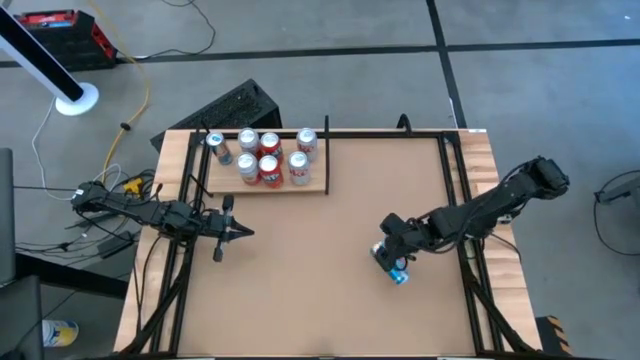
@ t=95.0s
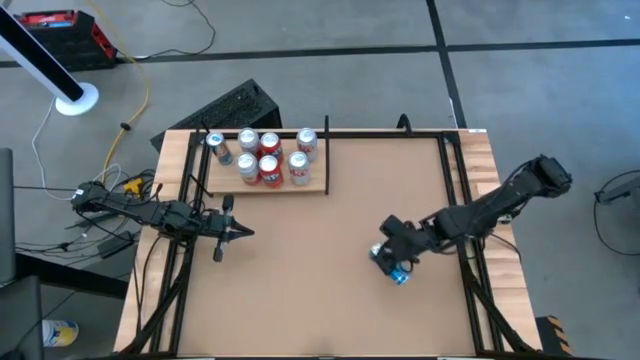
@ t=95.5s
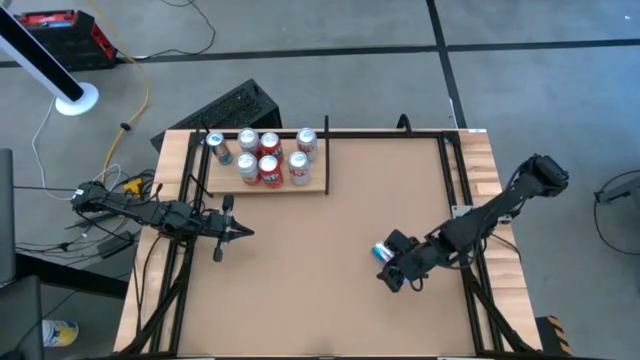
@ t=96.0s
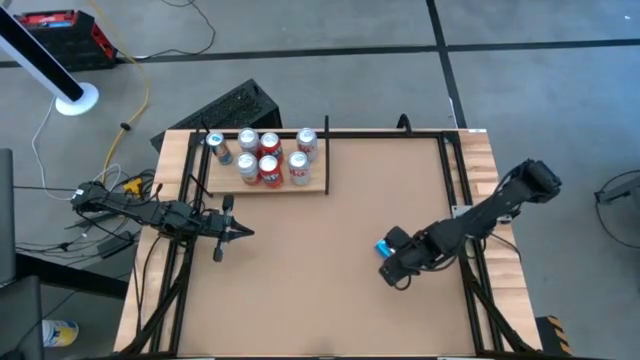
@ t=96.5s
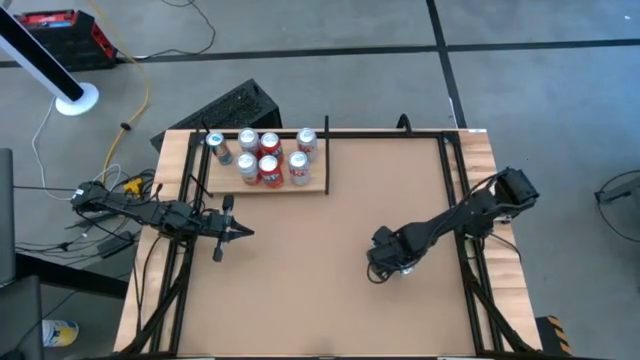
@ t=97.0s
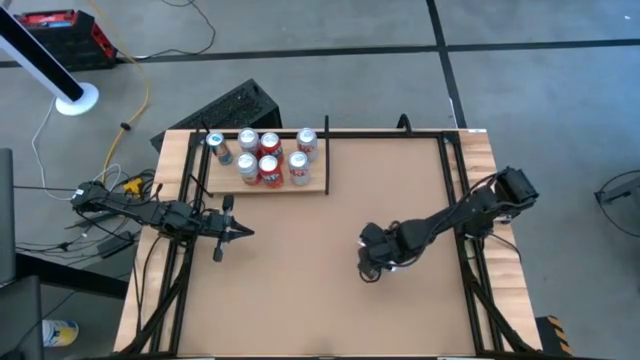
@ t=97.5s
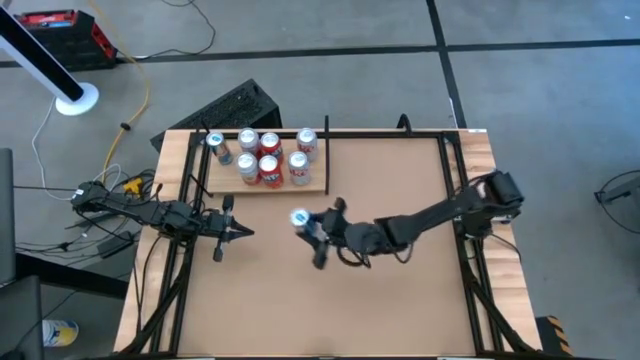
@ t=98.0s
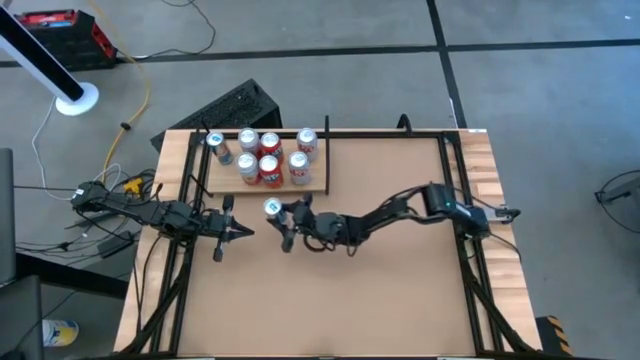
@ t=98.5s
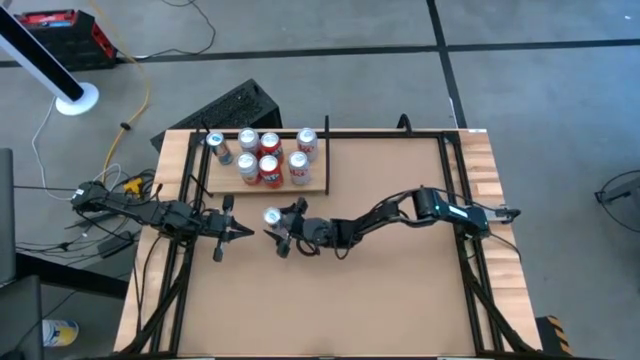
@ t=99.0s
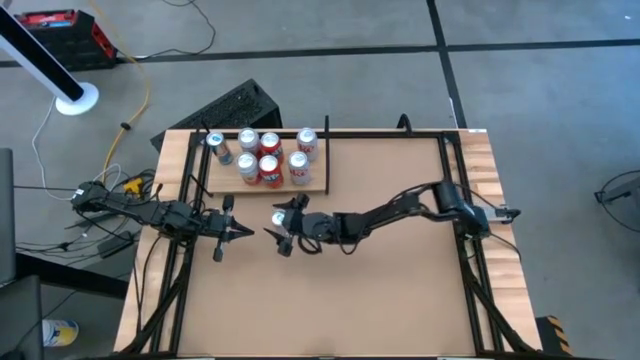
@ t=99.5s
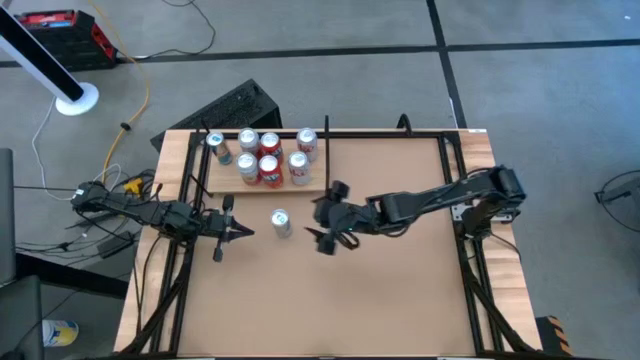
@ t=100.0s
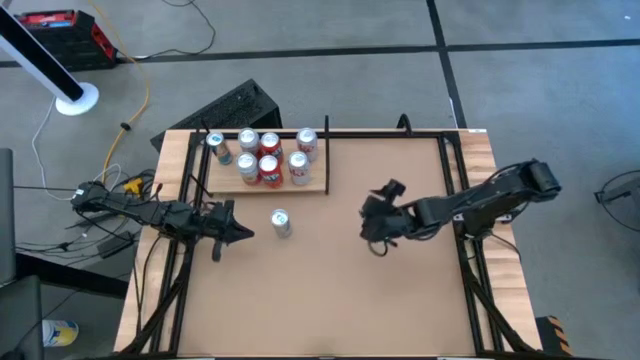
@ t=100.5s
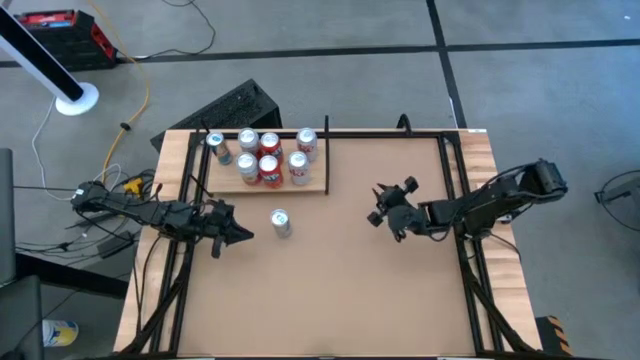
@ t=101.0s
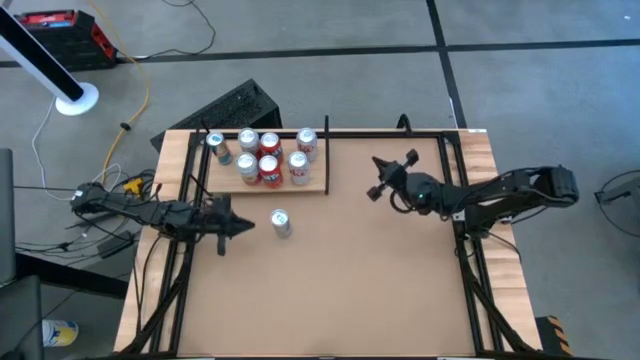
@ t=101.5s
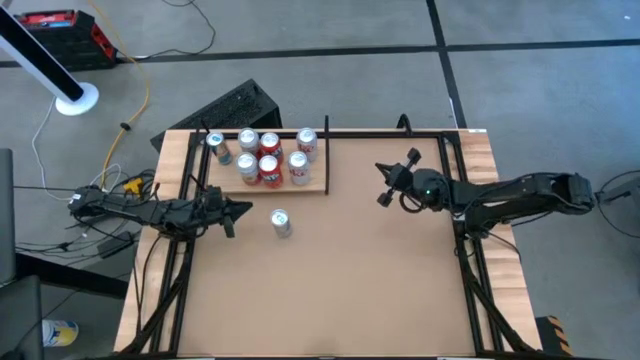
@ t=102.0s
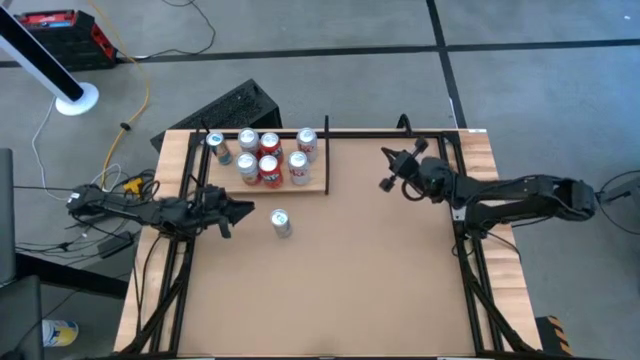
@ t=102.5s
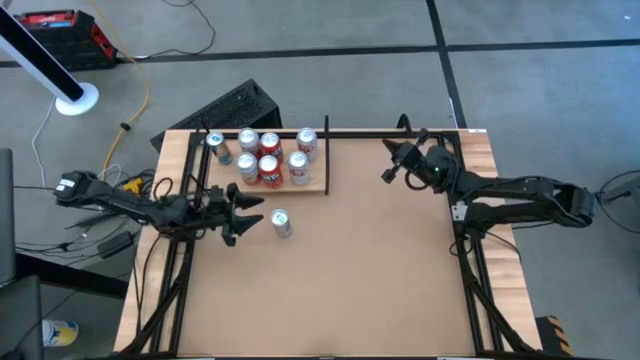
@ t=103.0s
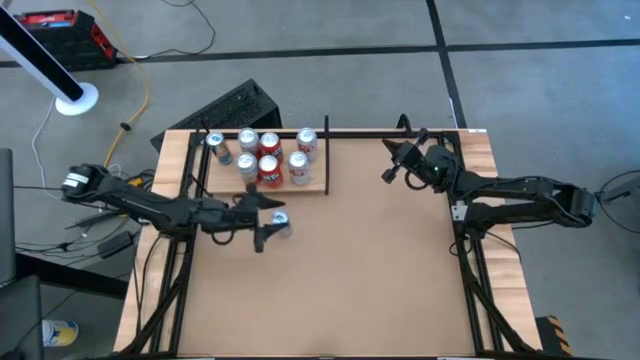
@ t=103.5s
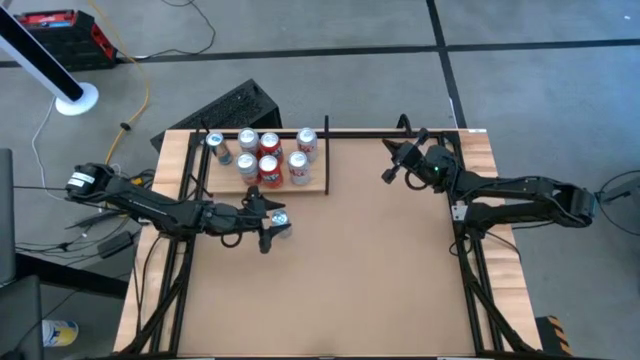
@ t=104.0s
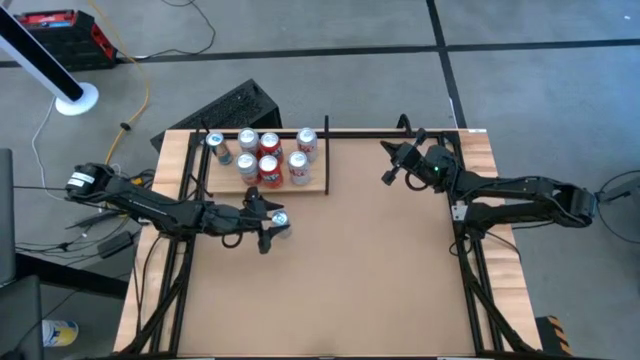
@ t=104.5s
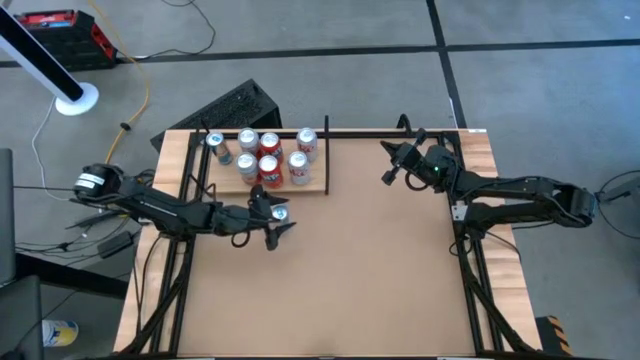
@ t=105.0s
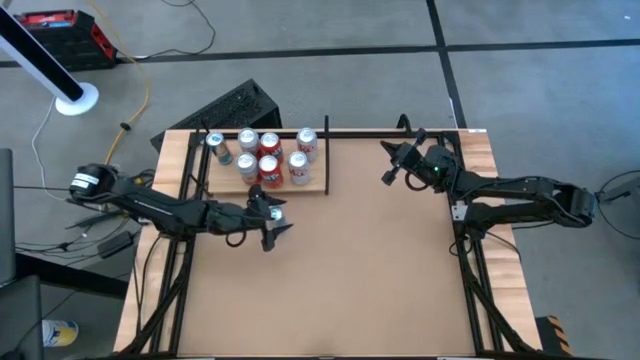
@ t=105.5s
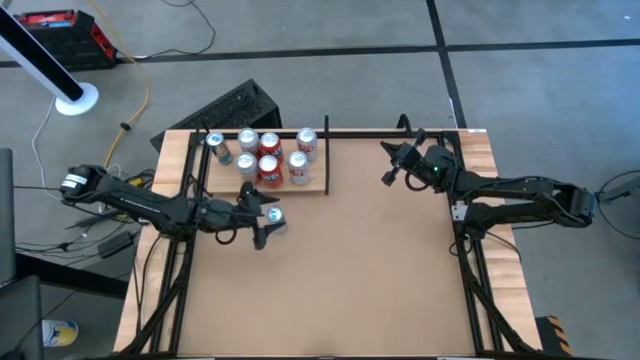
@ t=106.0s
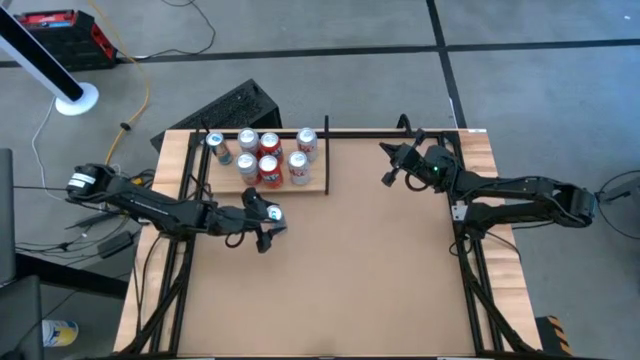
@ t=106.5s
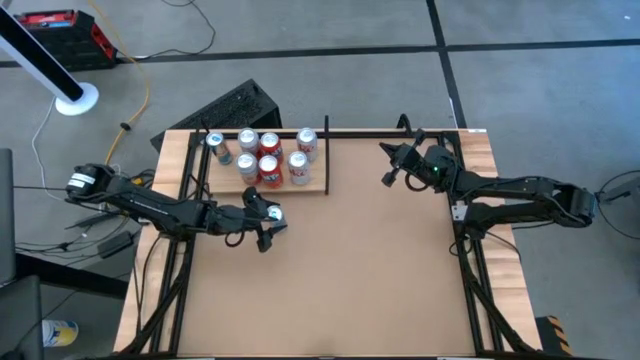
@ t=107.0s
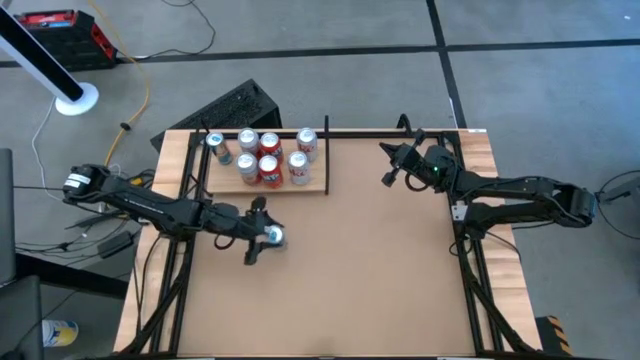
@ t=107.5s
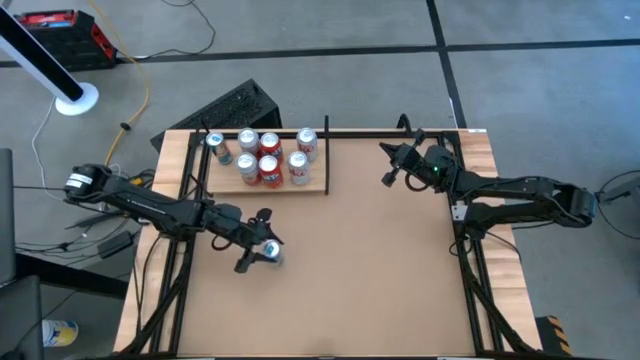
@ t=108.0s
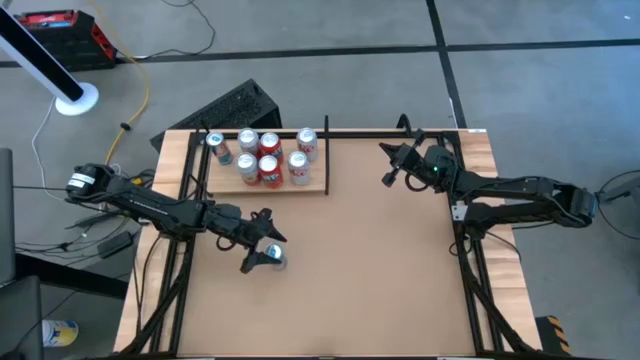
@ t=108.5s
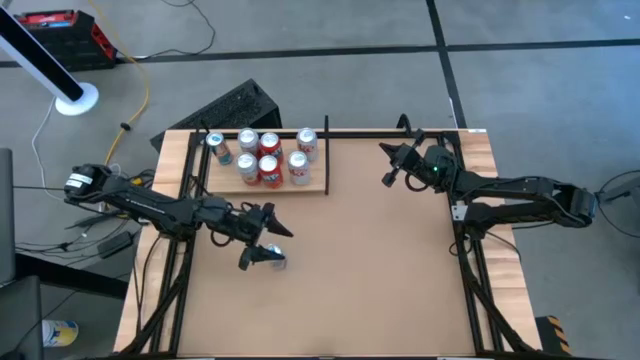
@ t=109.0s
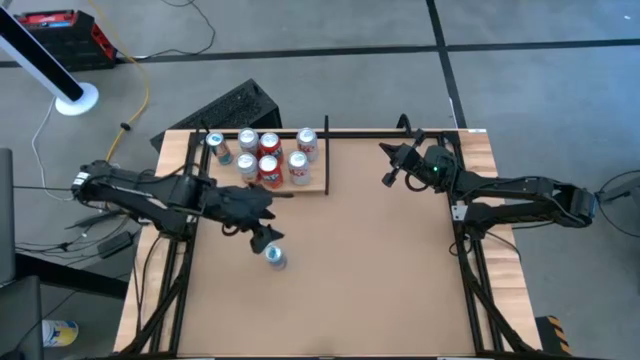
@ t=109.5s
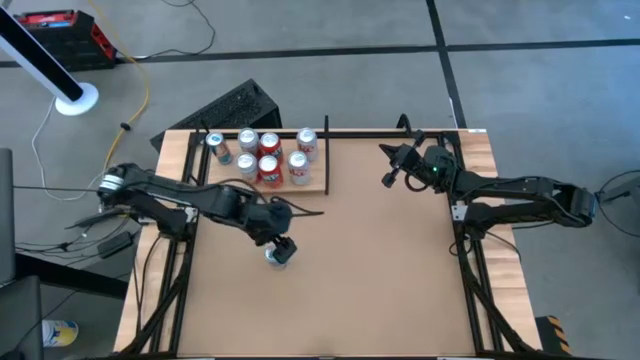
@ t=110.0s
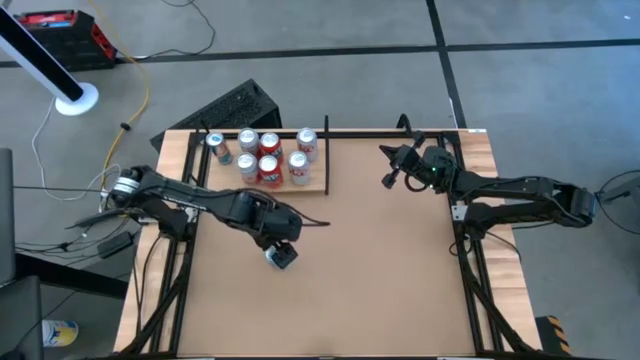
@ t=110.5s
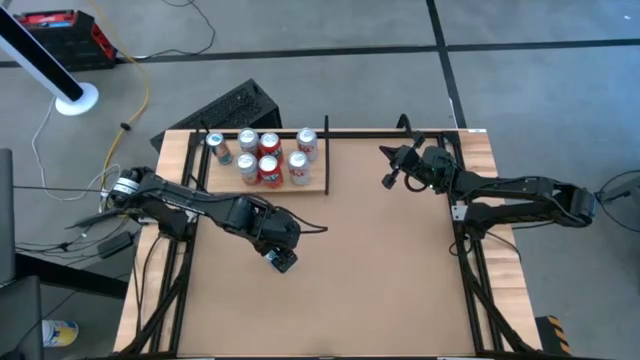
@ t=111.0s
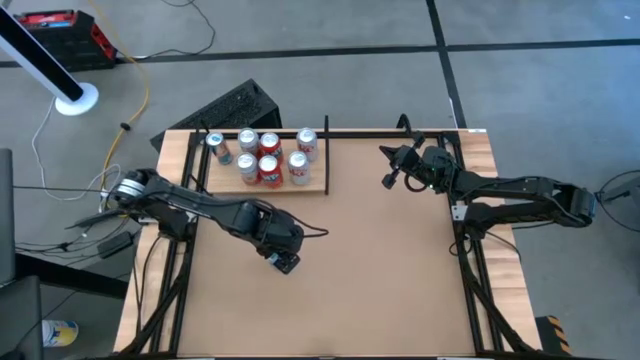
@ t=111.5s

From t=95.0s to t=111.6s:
Task: Place canned beverage on shelf
Put the blue soda can on the shelf aligned with the other blue soda can

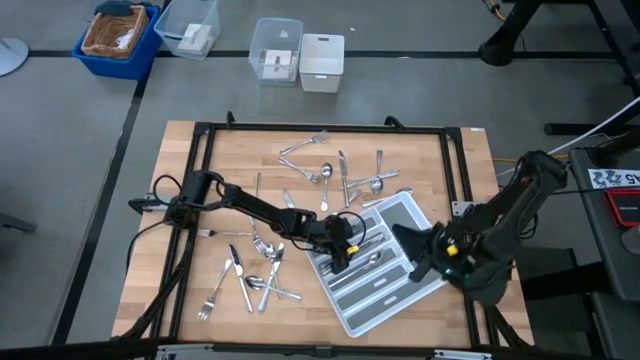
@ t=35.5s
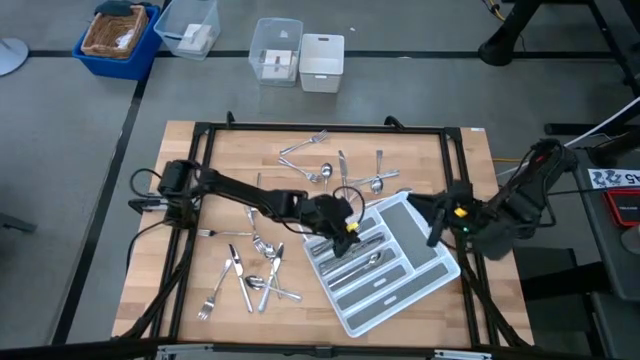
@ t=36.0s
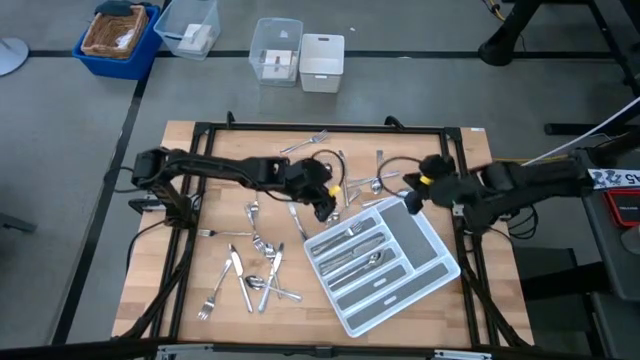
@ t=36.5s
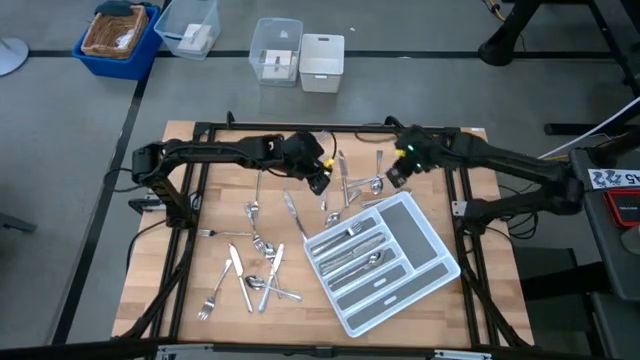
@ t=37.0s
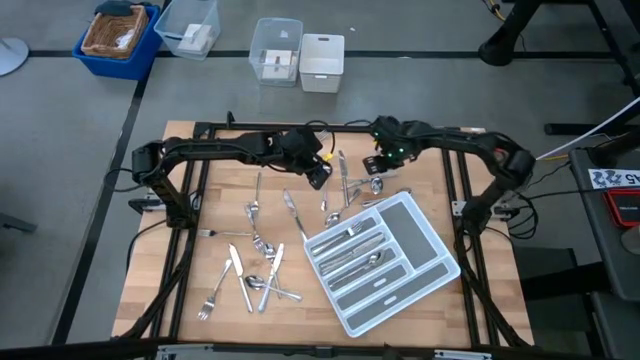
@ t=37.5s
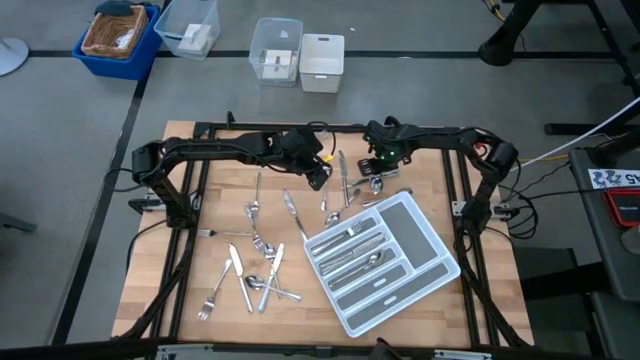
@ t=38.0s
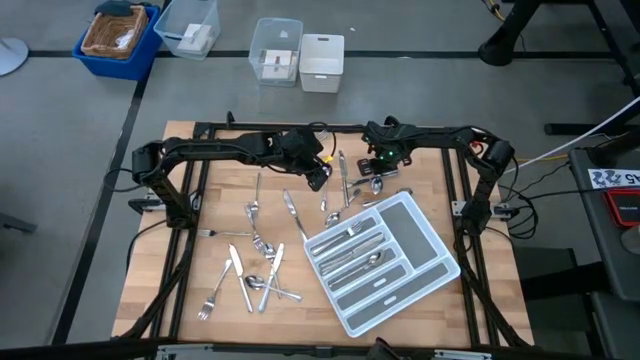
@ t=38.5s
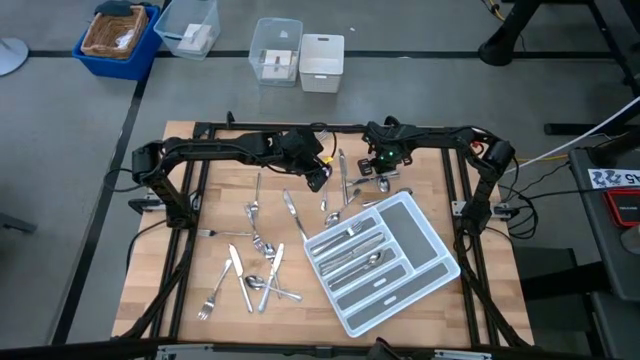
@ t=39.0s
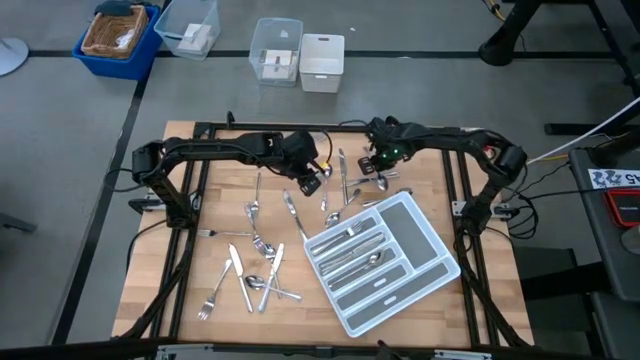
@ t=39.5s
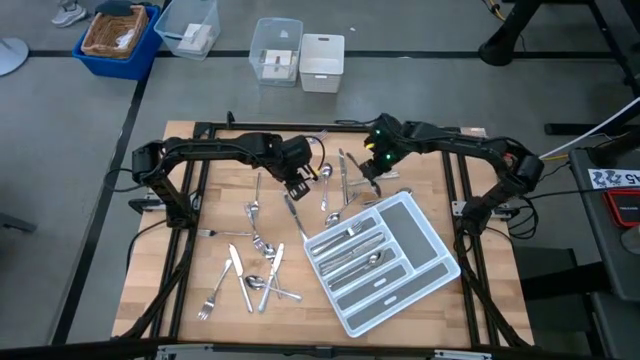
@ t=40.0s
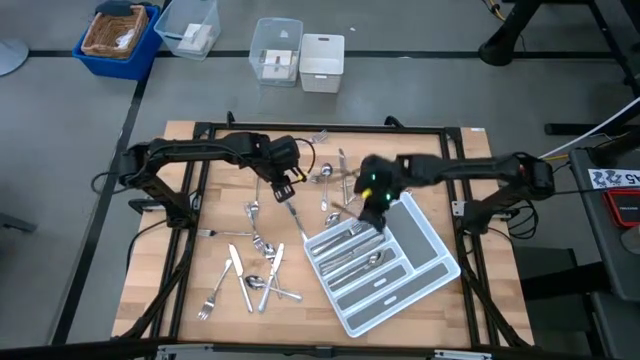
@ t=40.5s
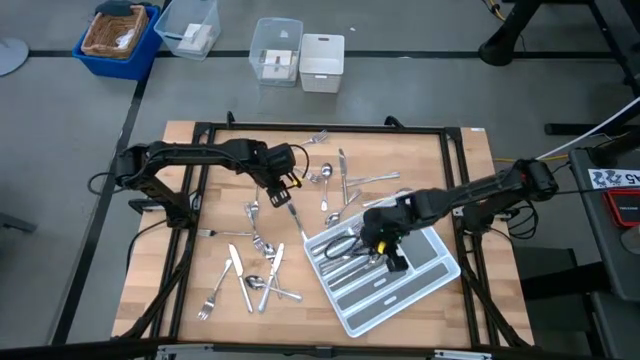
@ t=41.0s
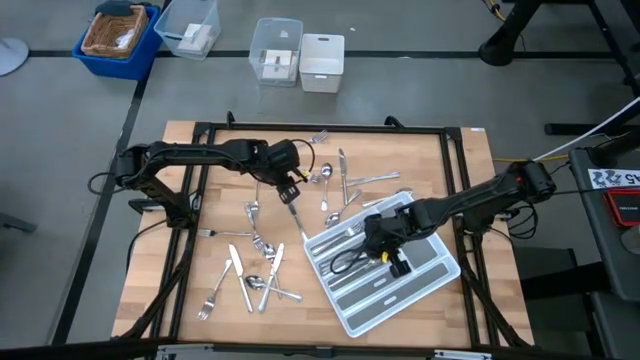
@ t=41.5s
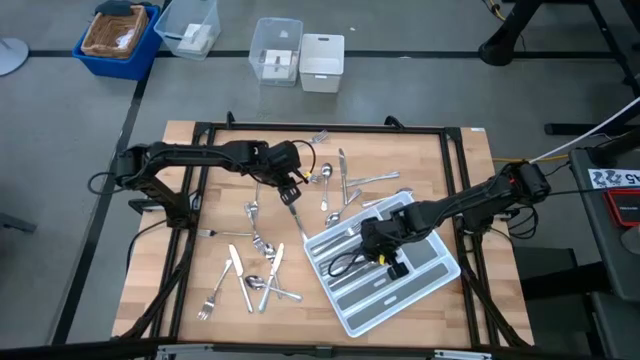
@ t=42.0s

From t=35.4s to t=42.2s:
Task: Sort silverware
Put the silver spoon into the silverware tray
